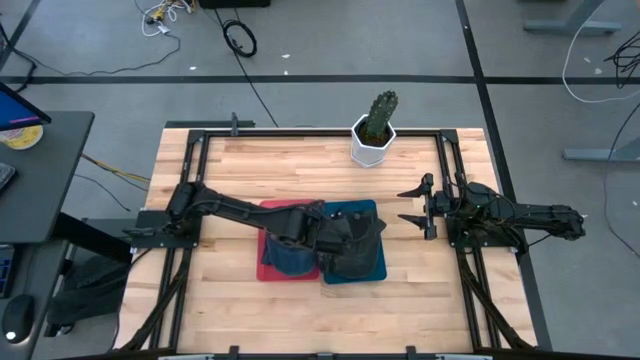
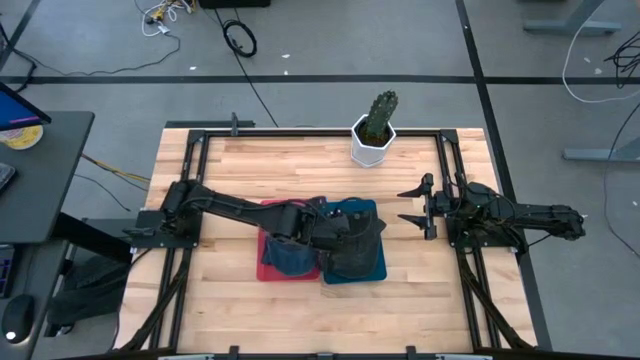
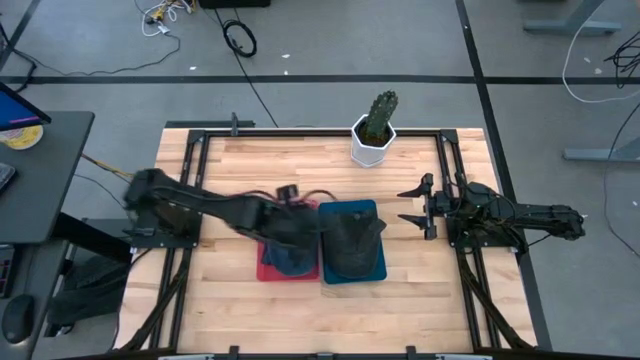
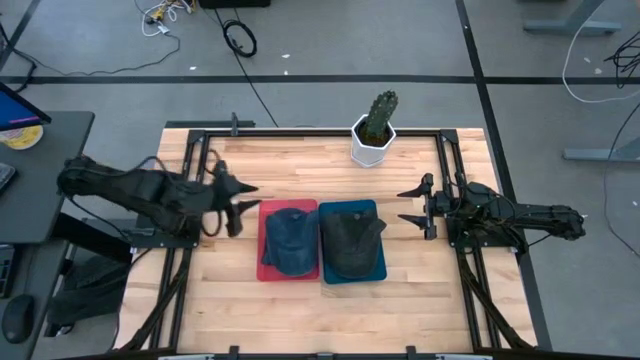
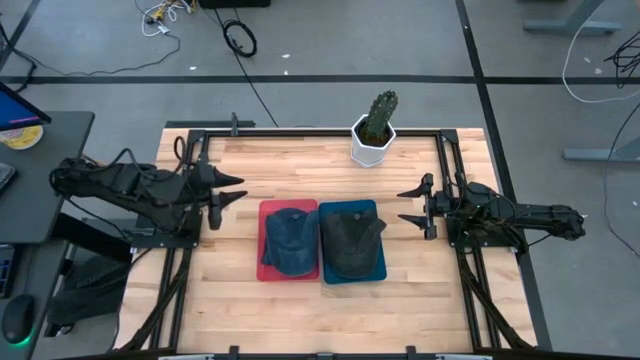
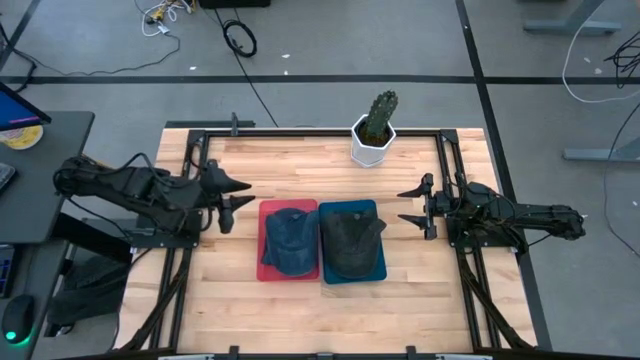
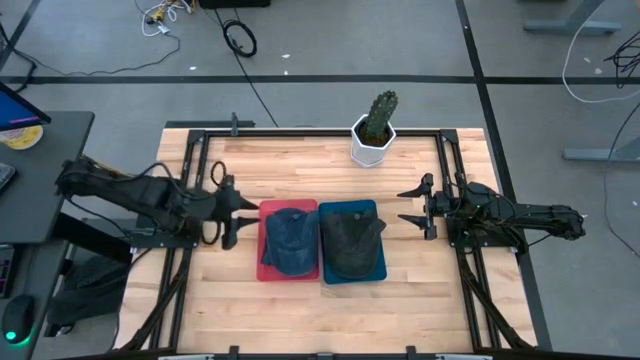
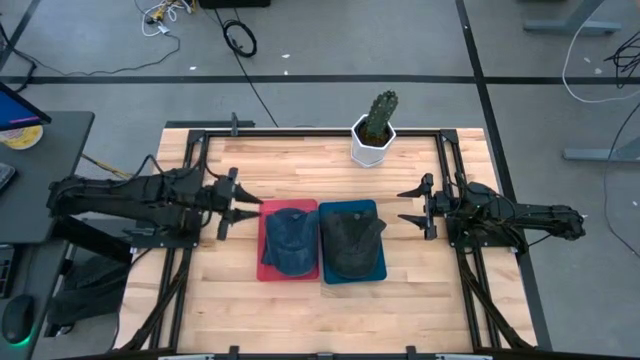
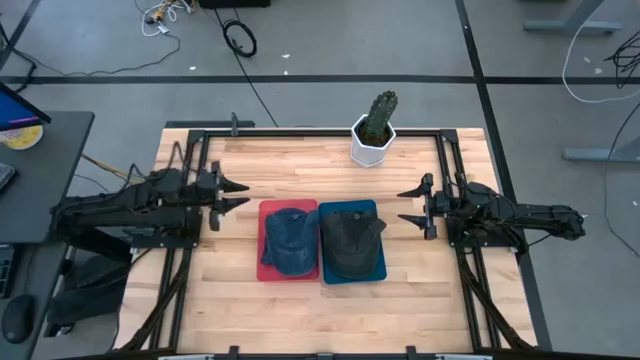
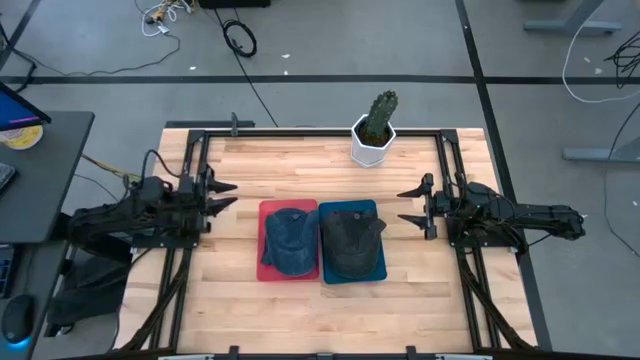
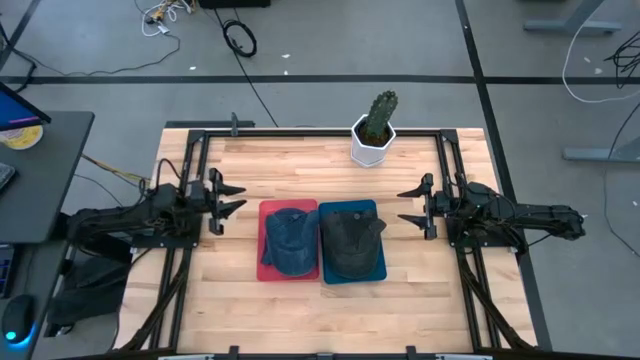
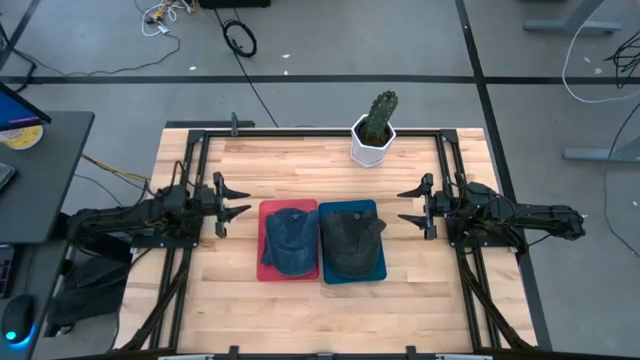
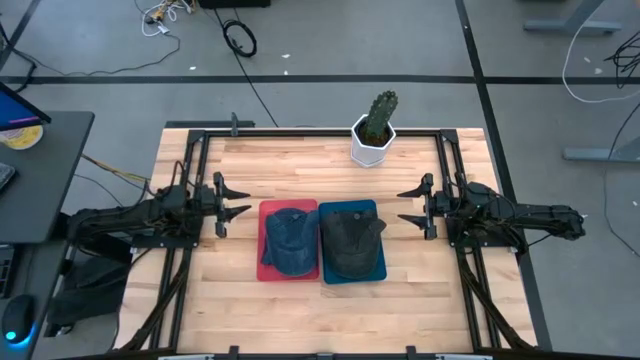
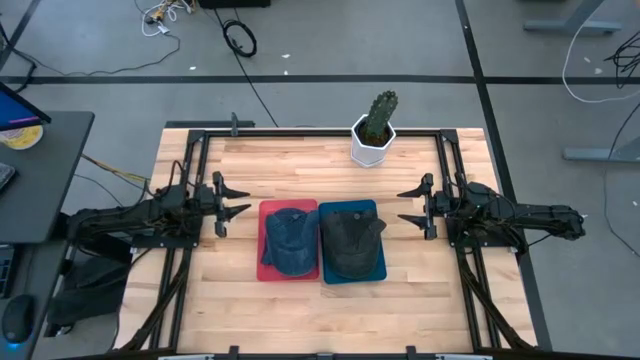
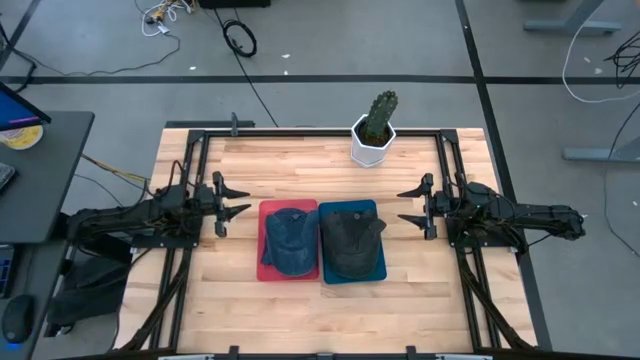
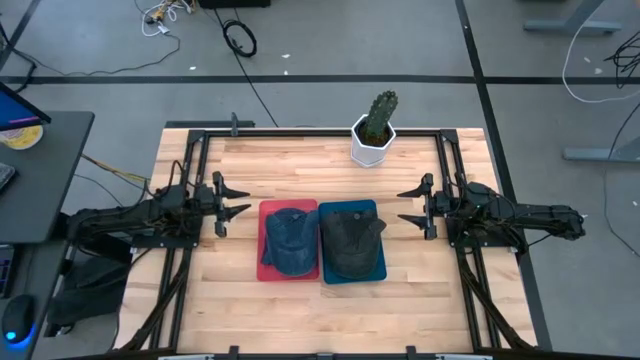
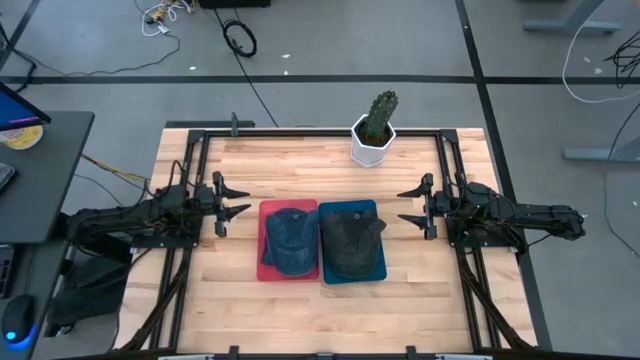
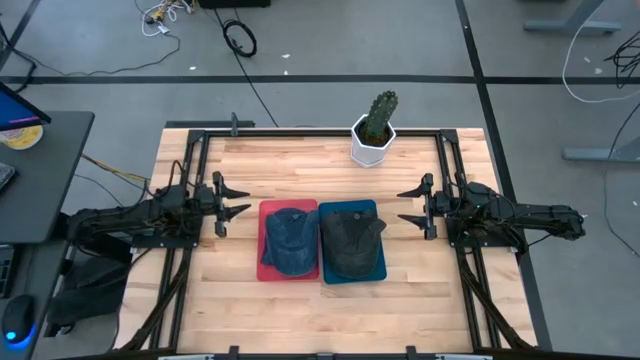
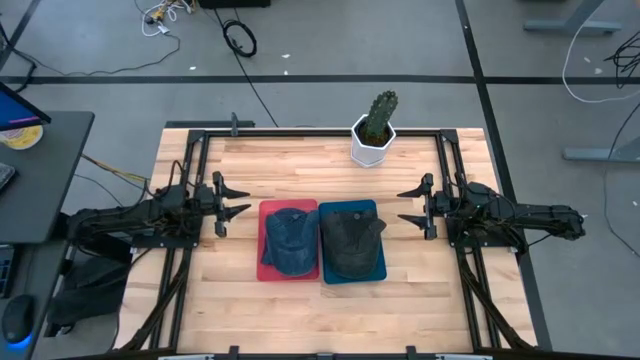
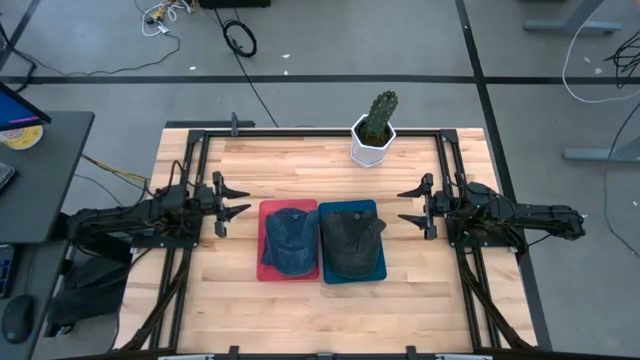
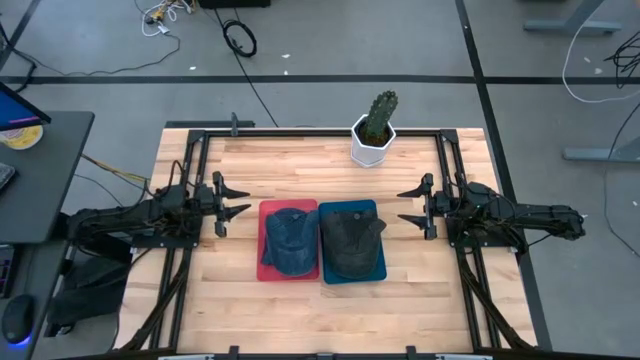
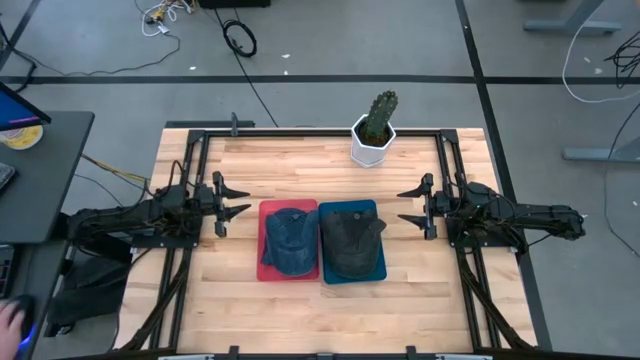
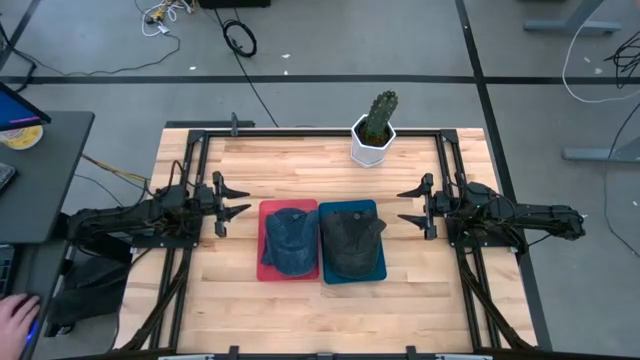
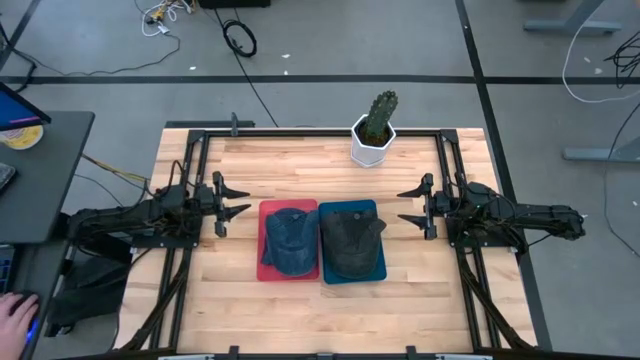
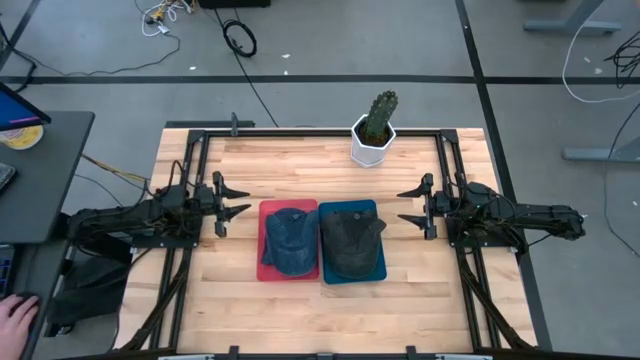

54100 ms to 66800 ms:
Task: Pick & Place hat
Return to Home Position

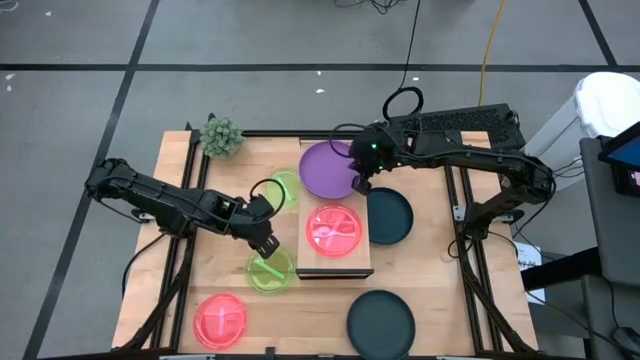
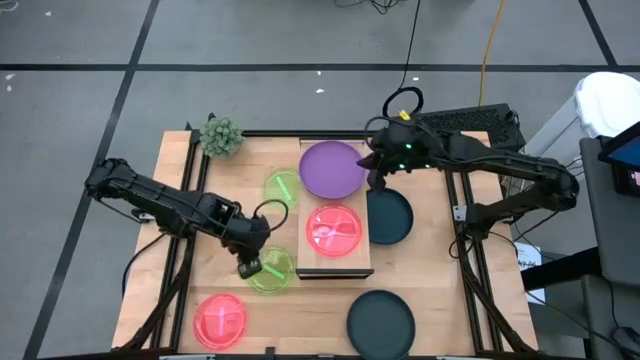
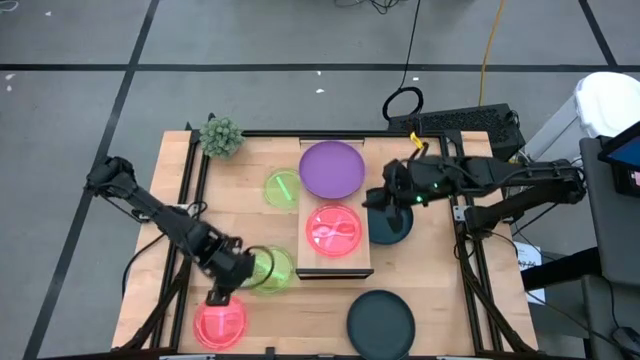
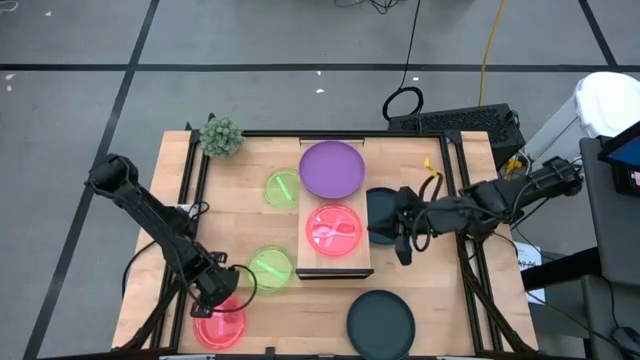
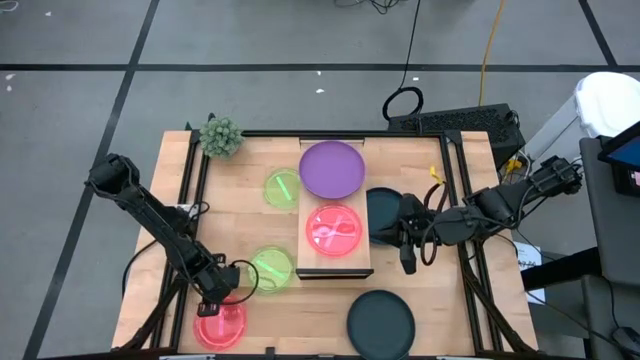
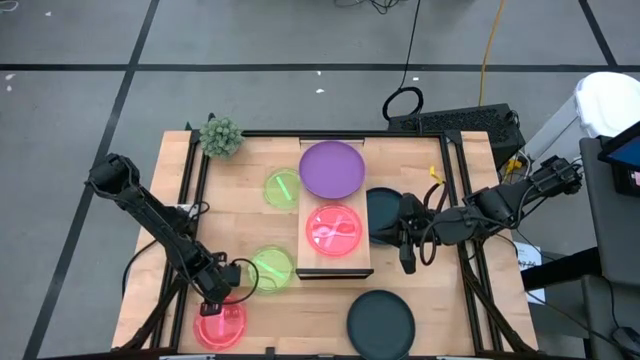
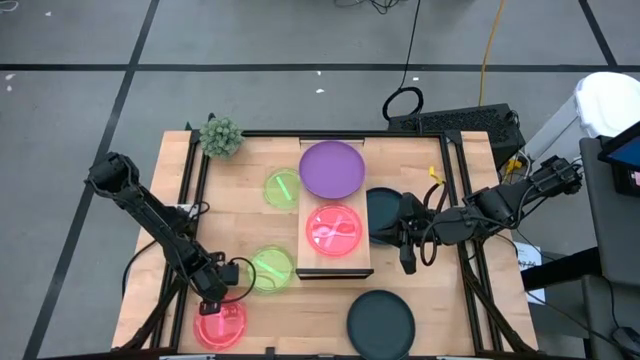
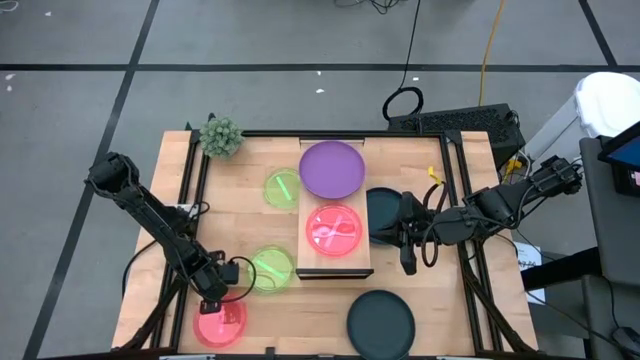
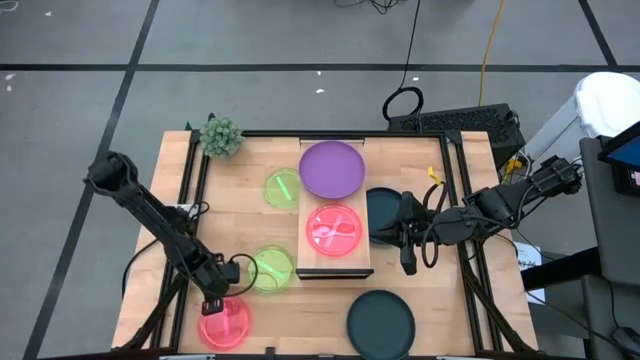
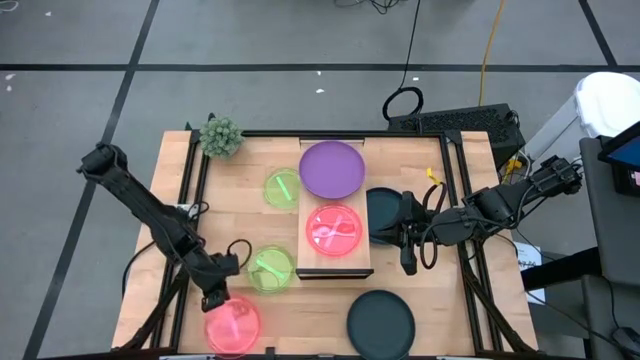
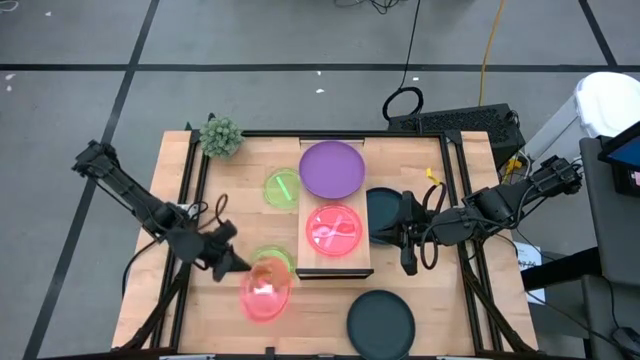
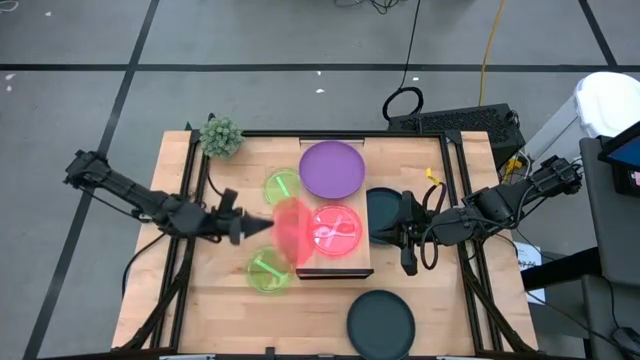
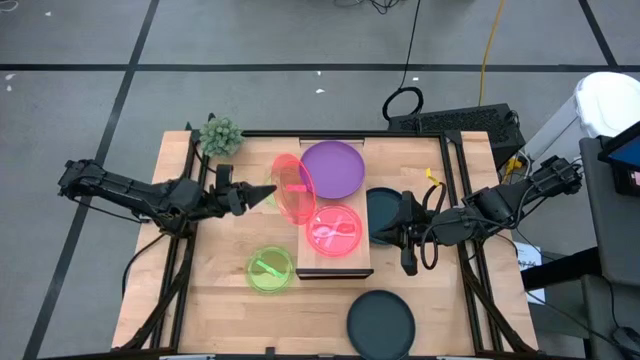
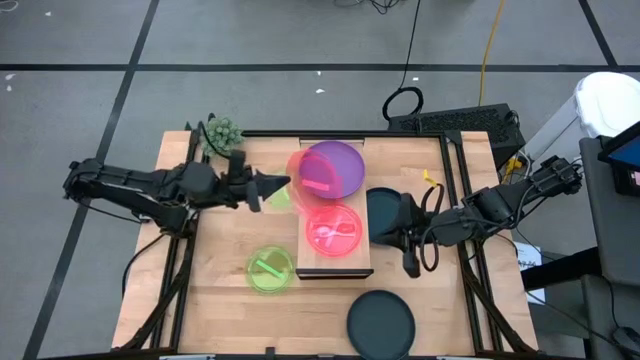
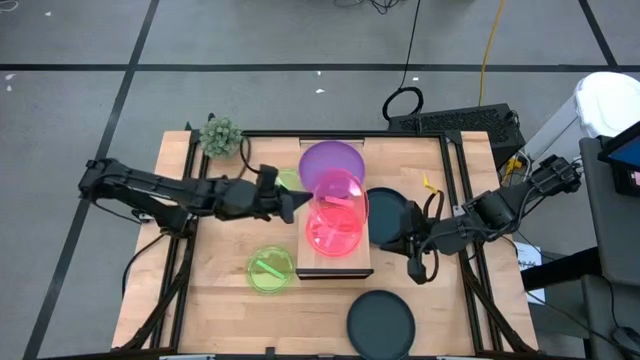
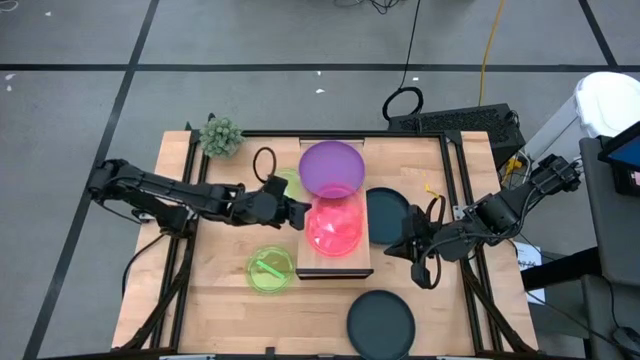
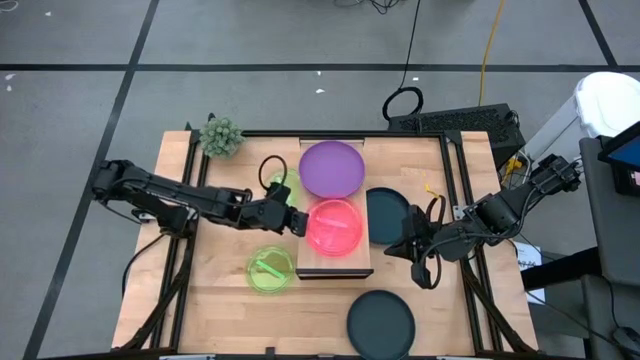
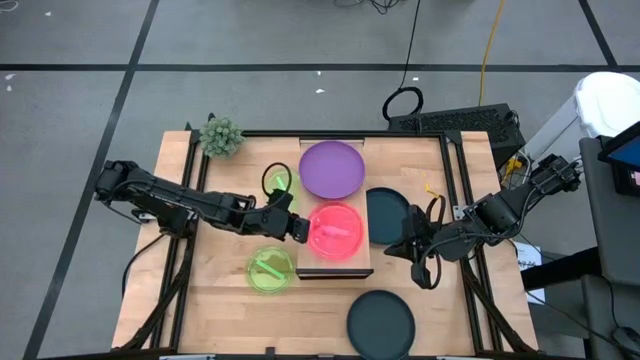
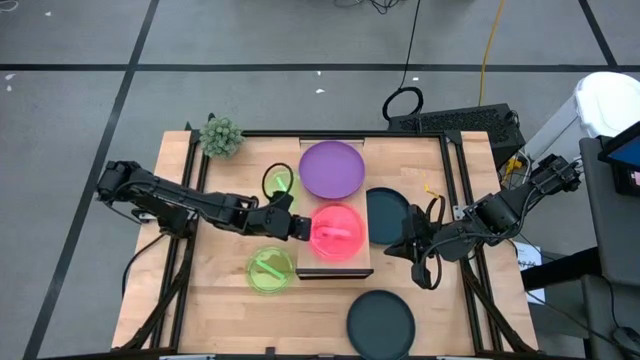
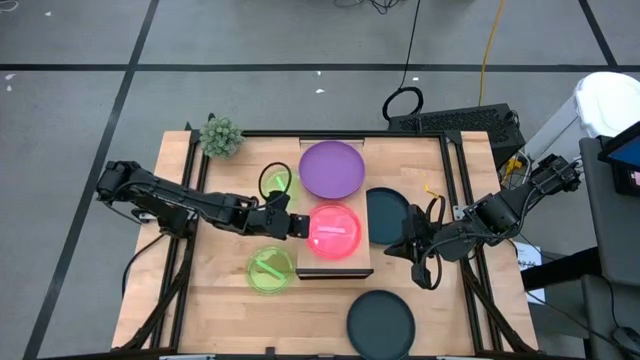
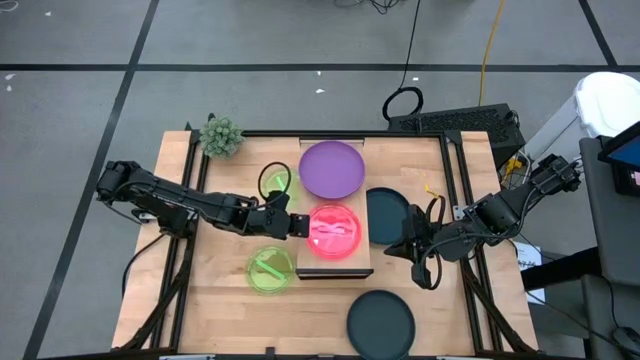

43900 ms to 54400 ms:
Task: Place and stack plates onto a shelf
Stack the pink plate on top of the other pink plate on the shelf
